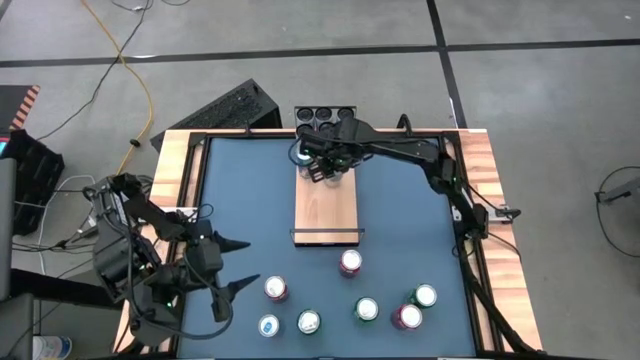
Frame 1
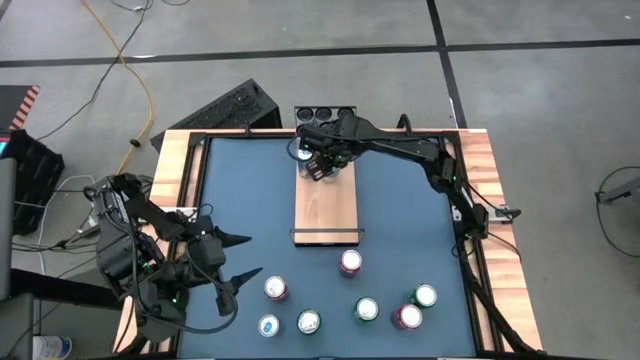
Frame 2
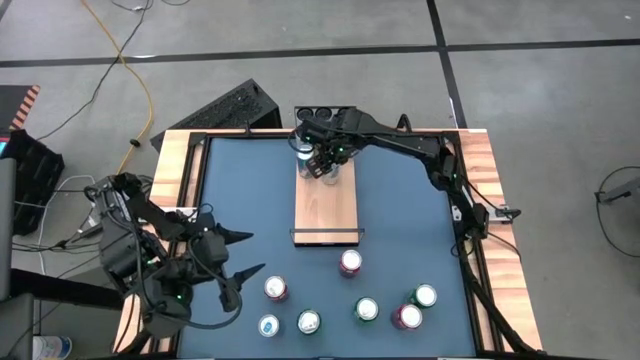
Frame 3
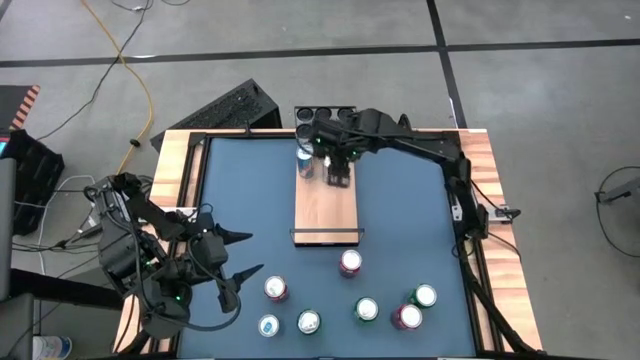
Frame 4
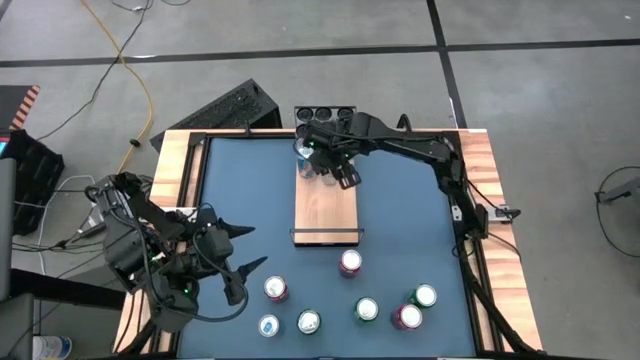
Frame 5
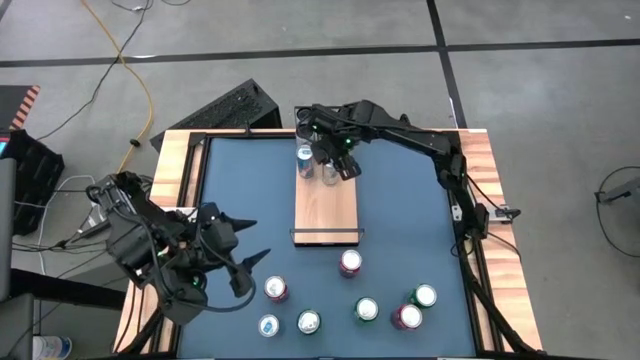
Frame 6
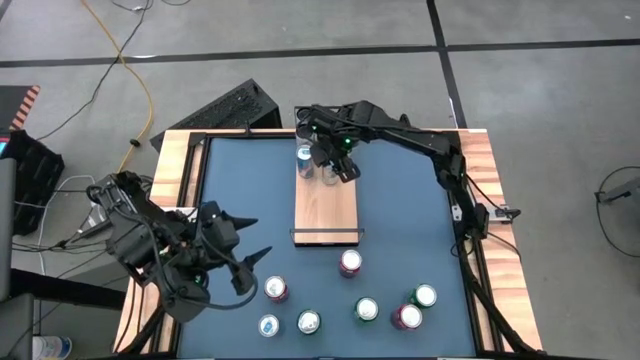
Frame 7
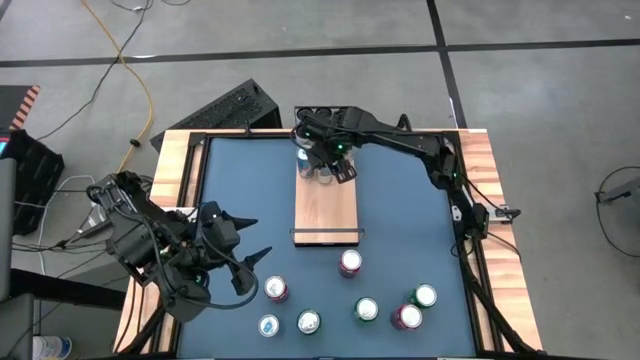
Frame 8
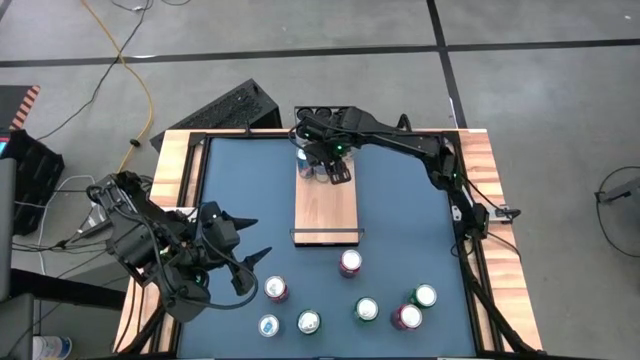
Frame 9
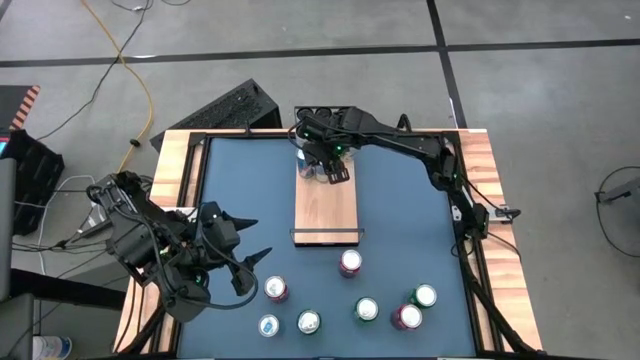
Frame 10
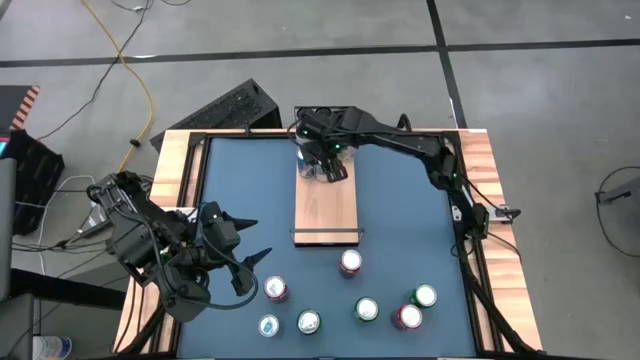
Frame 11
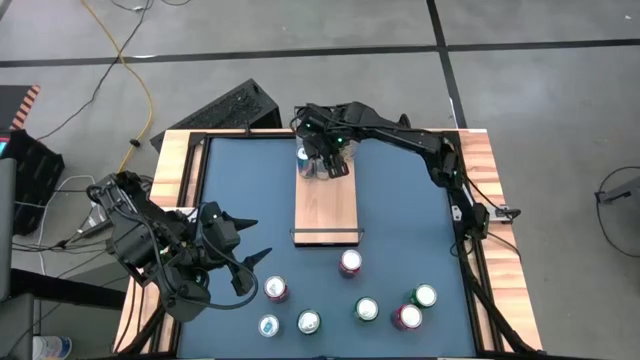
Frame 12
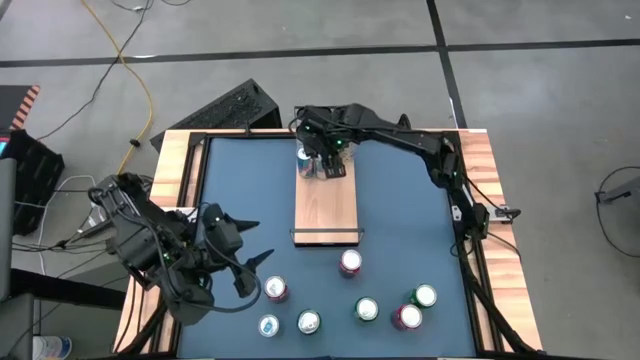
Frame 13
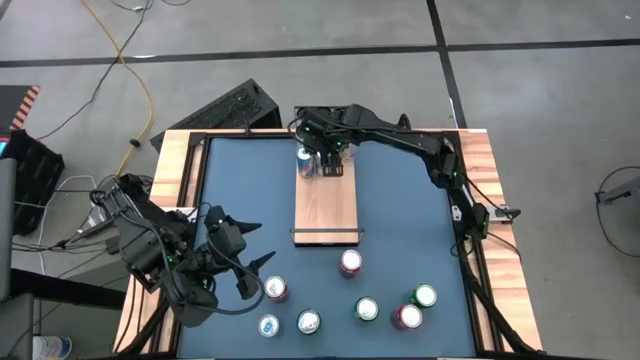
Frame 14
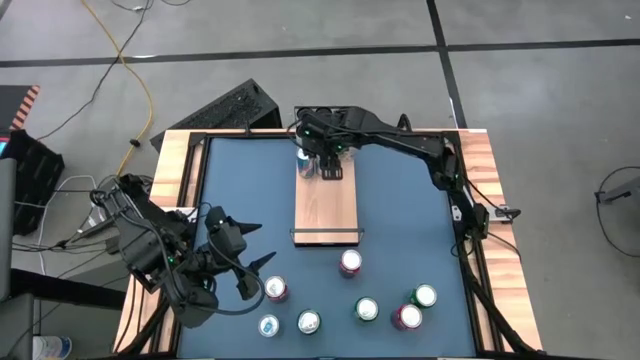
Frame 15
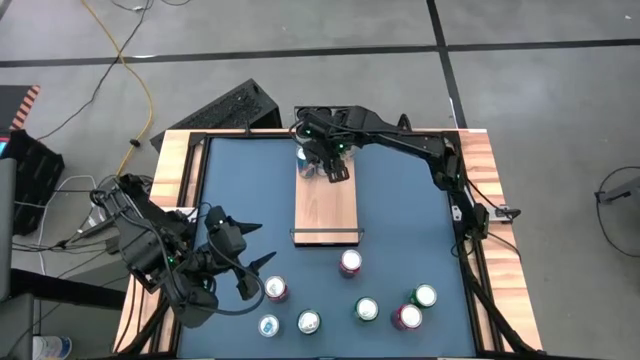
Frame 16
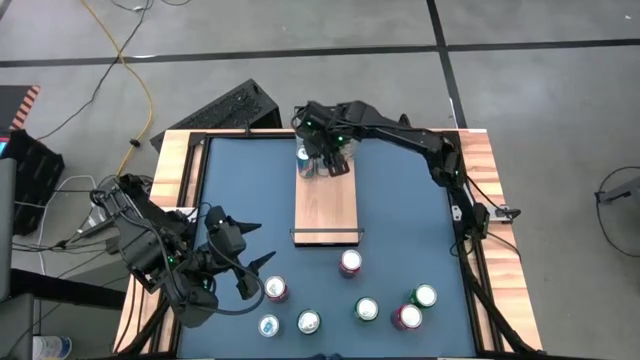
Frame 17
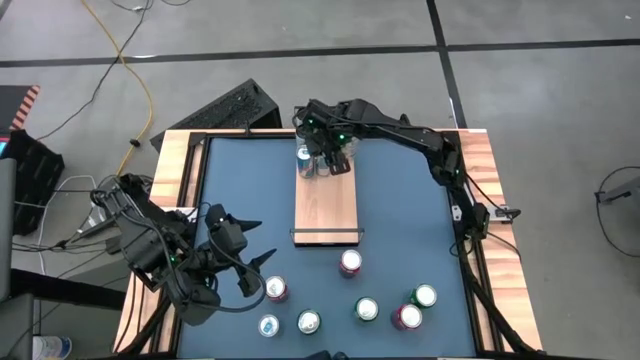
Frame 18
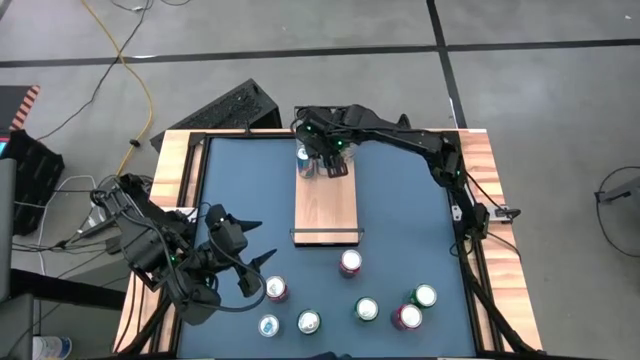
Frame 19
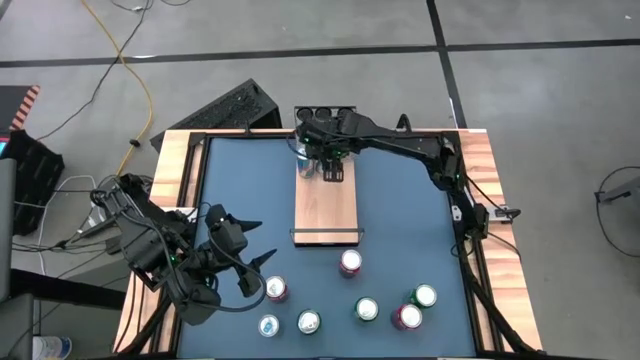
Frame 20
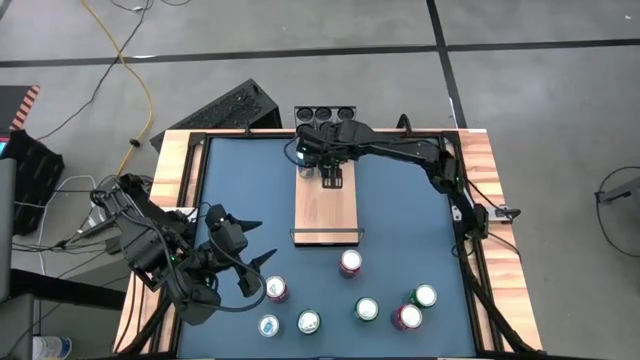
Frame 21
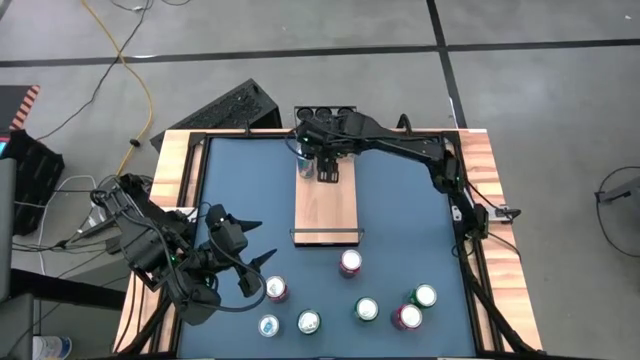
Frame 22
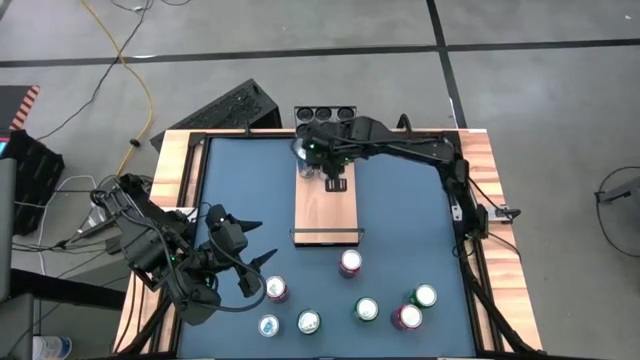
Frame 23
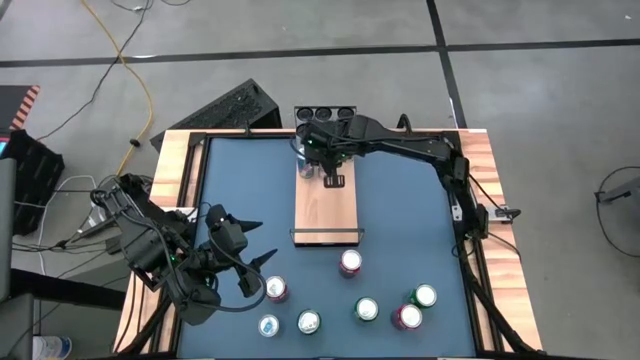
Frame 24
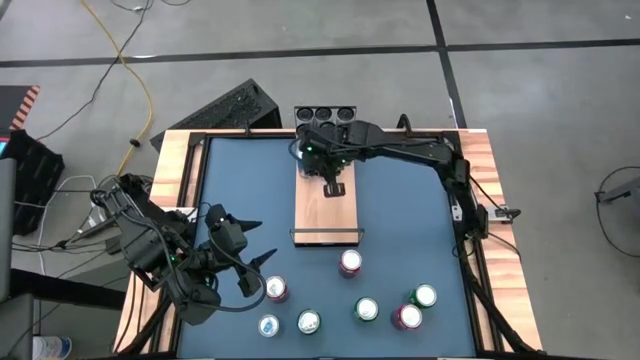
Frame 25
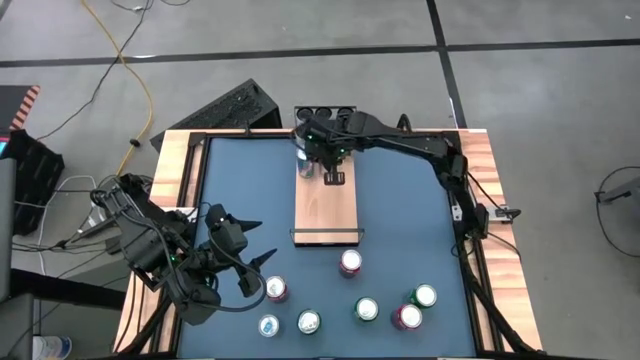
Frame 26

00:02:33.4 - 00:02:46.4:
Task: Place canned beverage on shelf
Put the right blue soda can on the shelf aligned with the other blue soda can

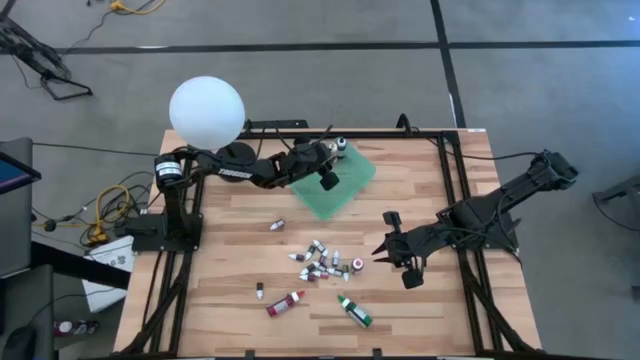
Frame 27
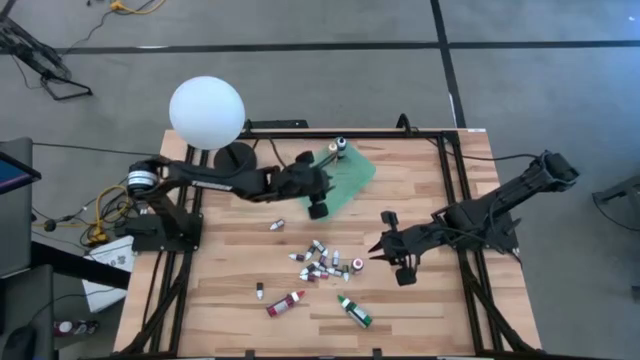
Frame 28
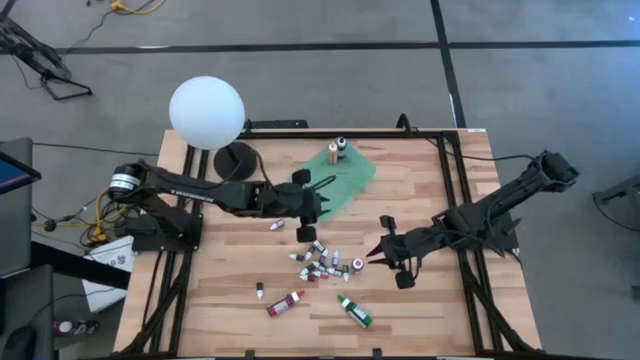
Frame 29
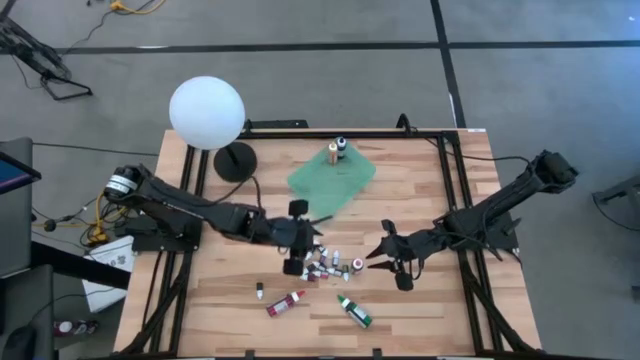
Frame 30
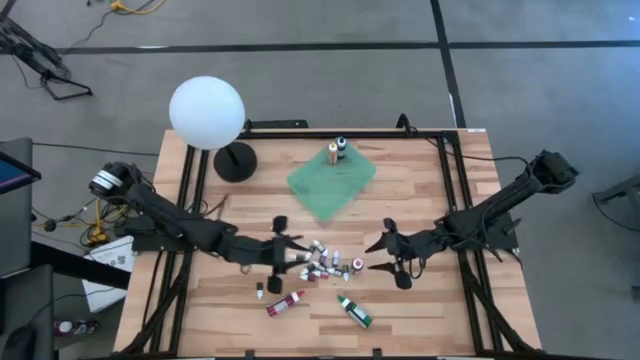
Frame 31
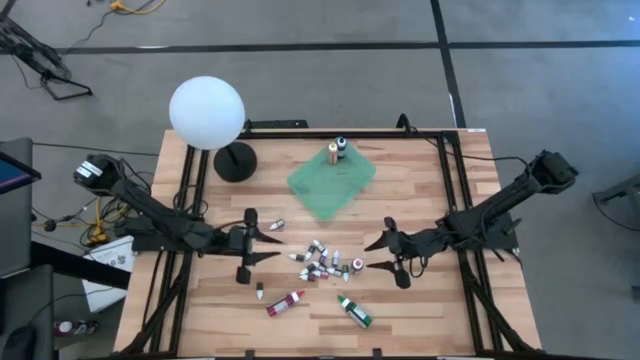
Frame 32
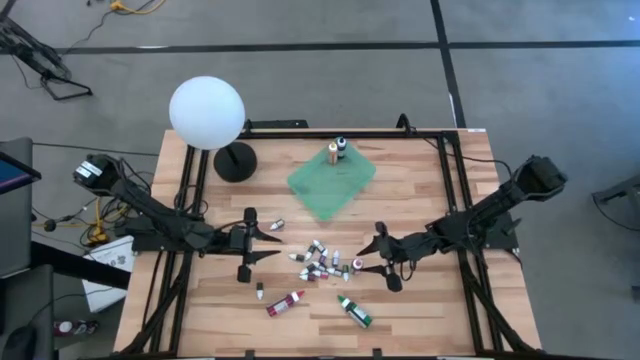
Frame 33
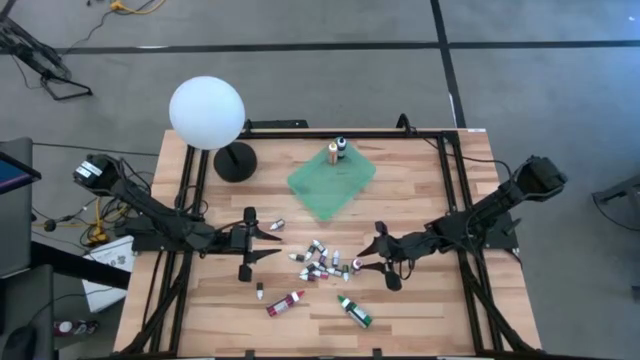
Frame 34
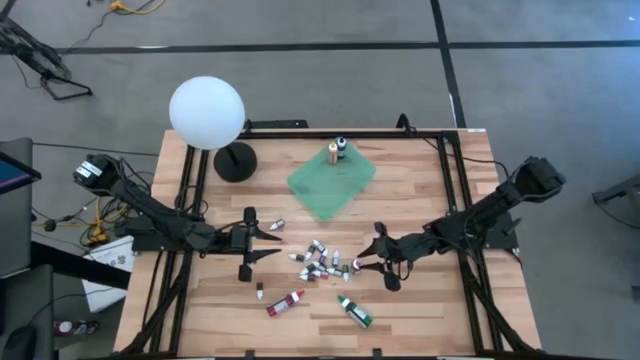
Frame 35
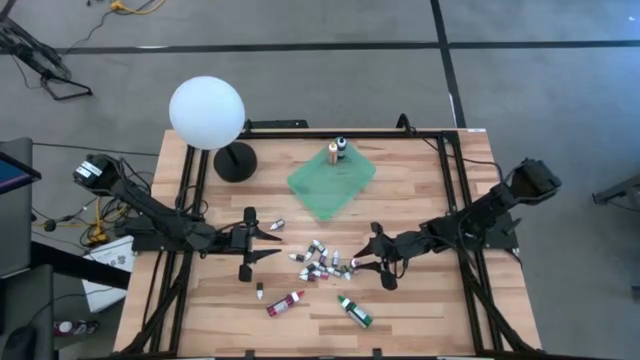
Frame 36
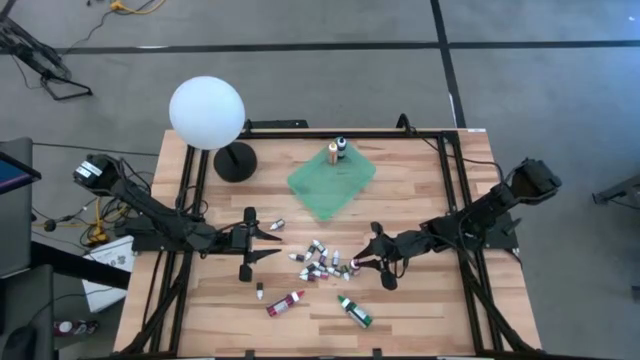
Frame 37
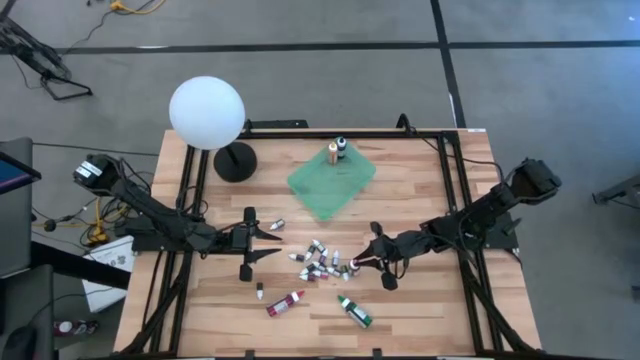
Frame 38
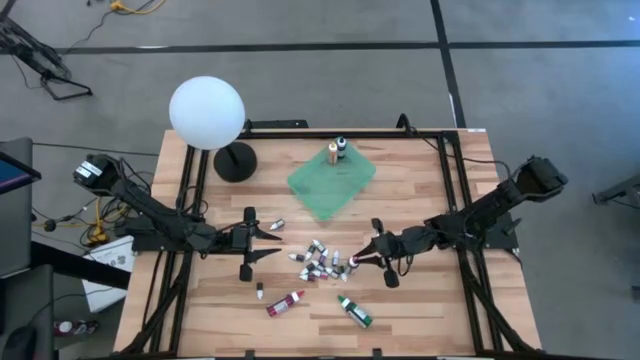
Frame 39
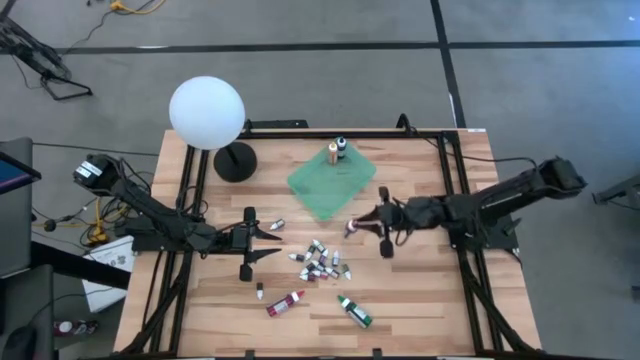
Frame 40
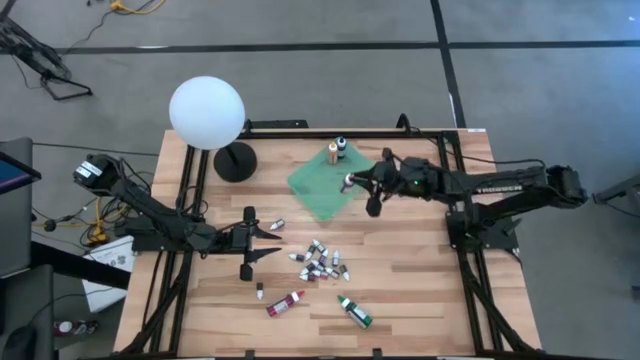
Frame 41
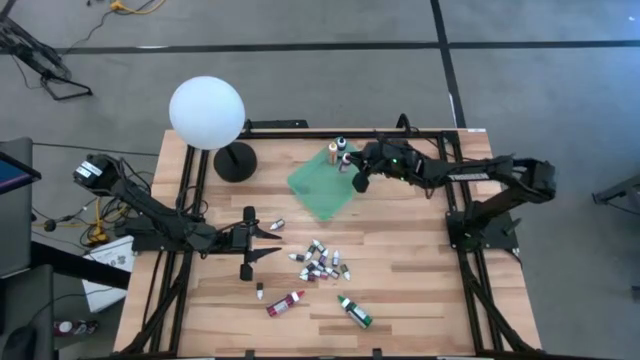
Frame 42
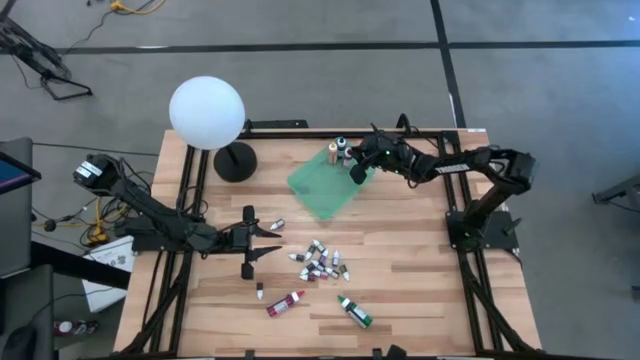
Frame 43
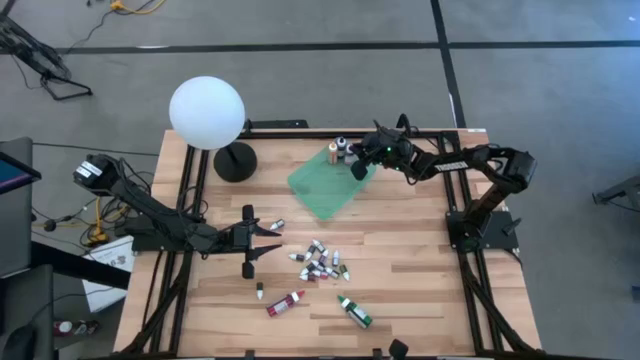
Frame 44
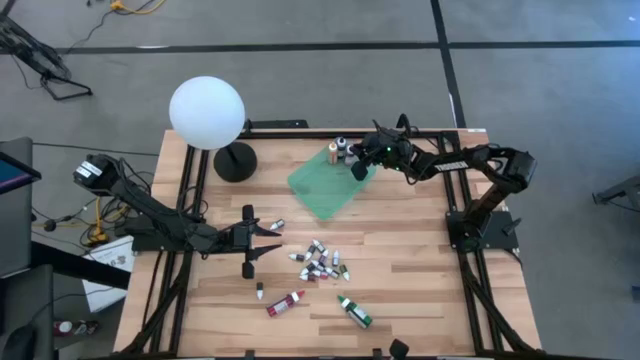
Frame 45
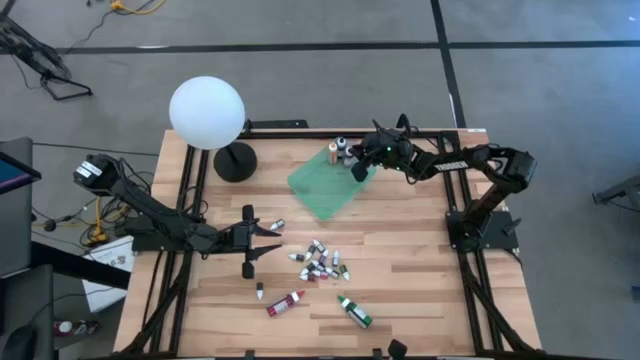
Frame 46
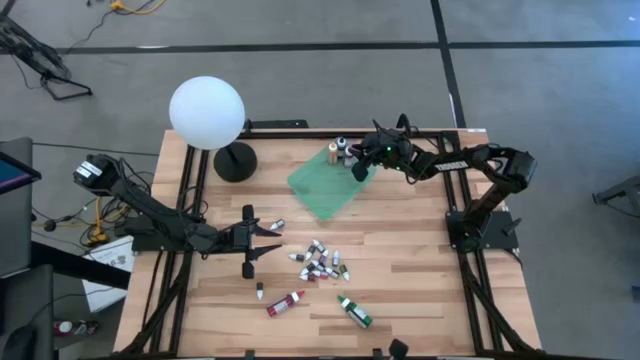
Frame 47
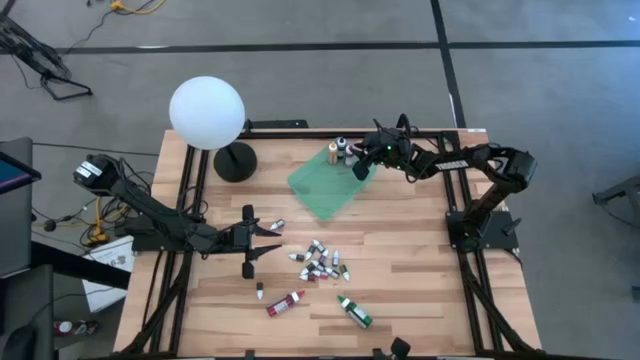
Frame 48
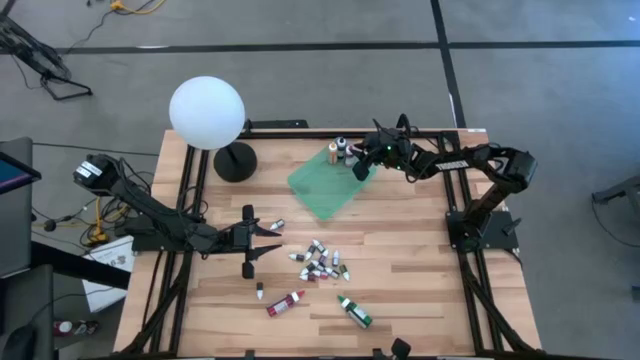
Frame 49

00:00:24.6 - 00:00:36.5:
Task: Pick & Place food coloring
Put the right pink food coloring bottle into the green bin
